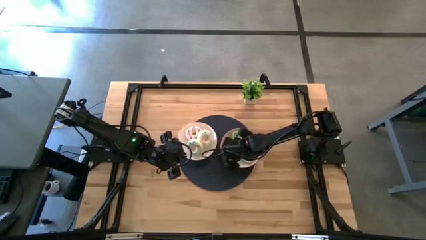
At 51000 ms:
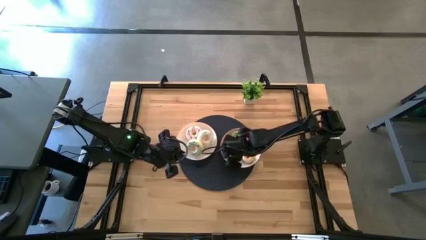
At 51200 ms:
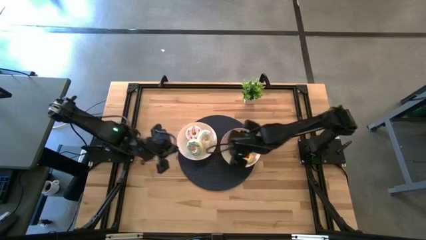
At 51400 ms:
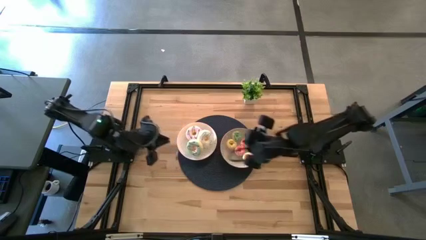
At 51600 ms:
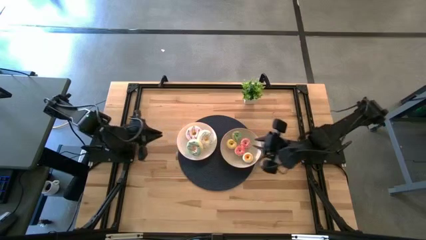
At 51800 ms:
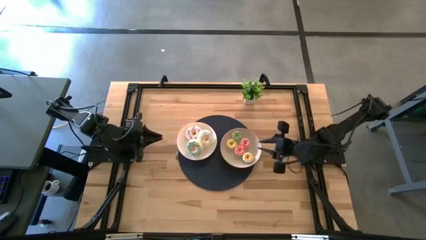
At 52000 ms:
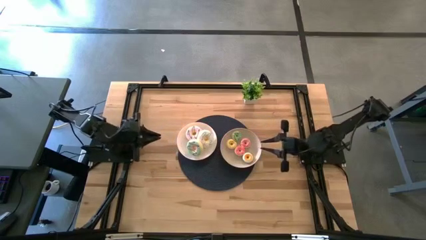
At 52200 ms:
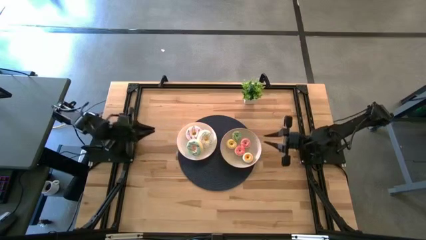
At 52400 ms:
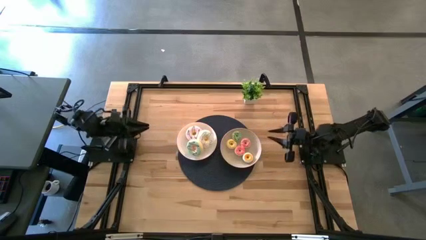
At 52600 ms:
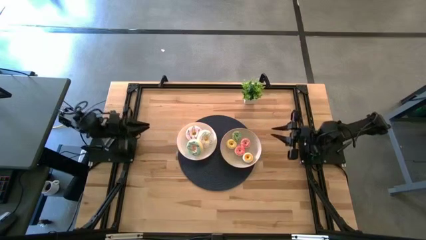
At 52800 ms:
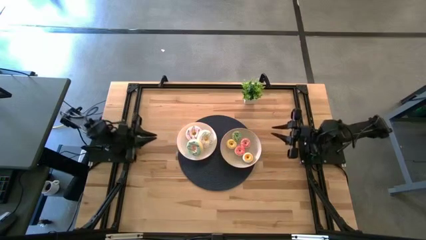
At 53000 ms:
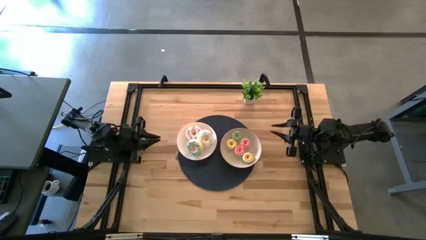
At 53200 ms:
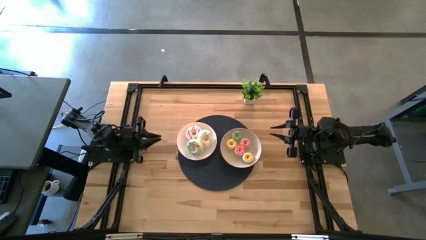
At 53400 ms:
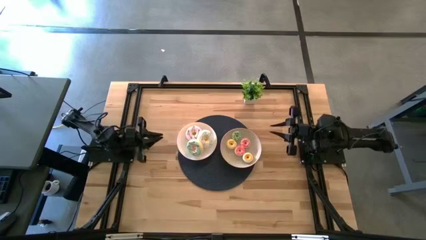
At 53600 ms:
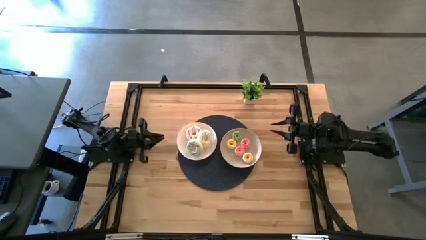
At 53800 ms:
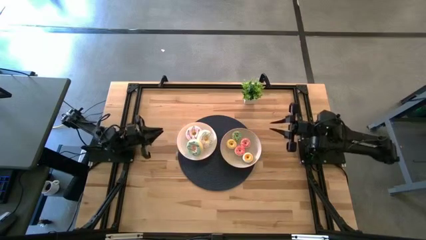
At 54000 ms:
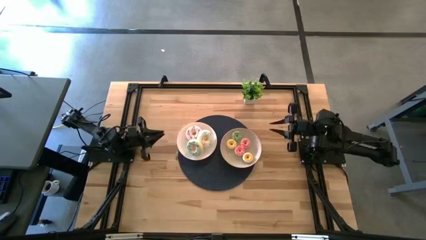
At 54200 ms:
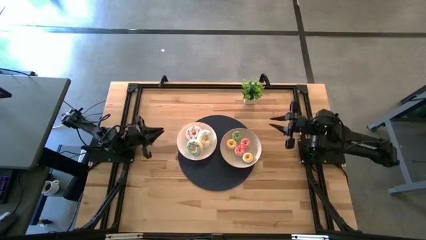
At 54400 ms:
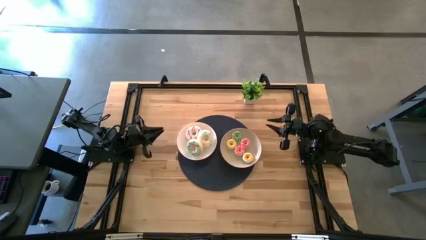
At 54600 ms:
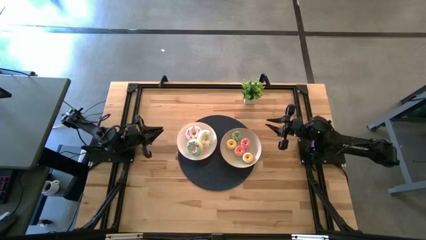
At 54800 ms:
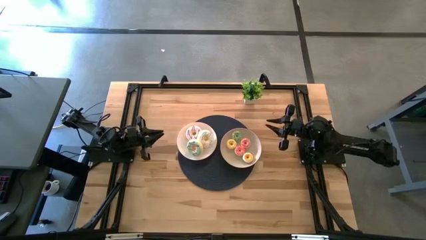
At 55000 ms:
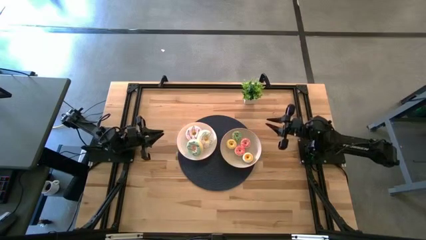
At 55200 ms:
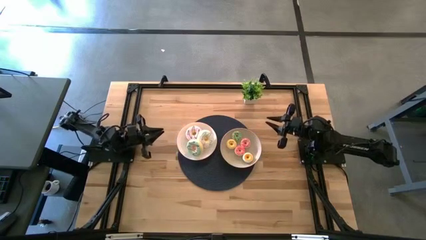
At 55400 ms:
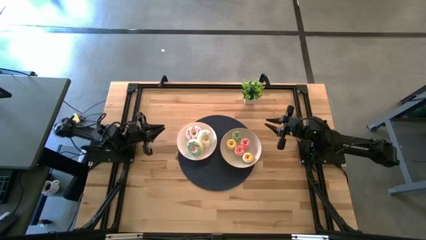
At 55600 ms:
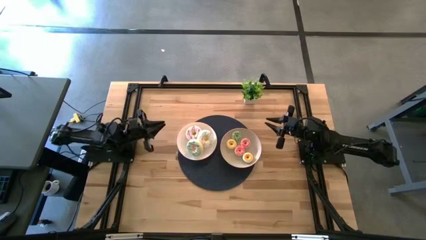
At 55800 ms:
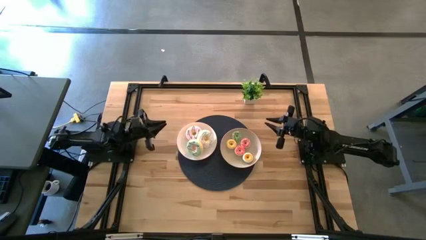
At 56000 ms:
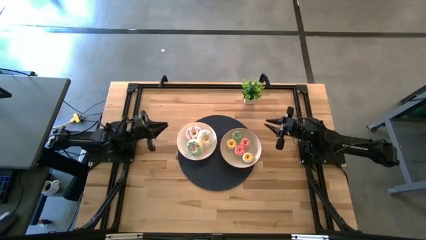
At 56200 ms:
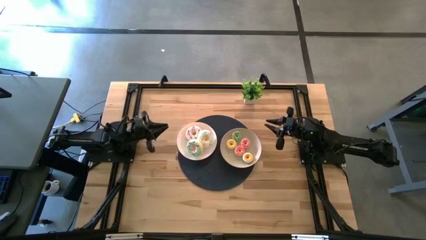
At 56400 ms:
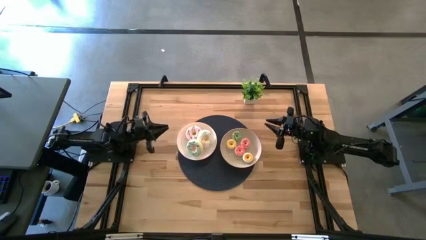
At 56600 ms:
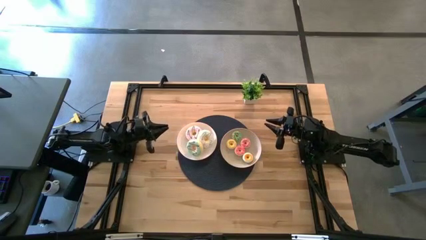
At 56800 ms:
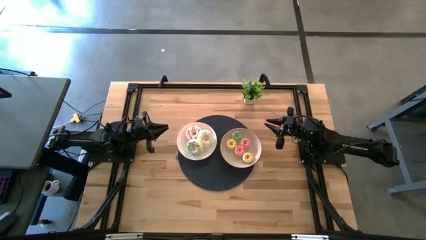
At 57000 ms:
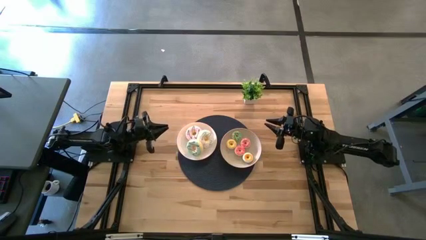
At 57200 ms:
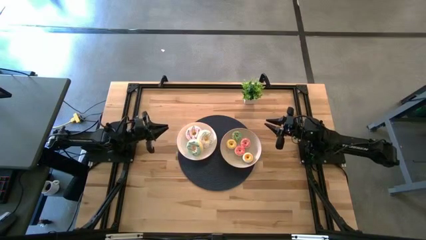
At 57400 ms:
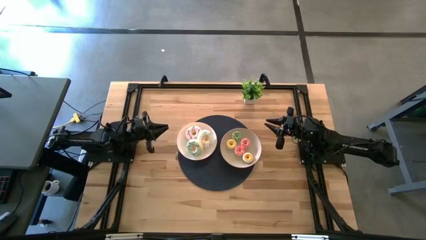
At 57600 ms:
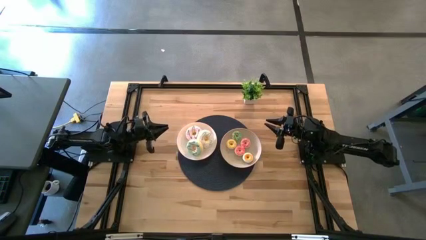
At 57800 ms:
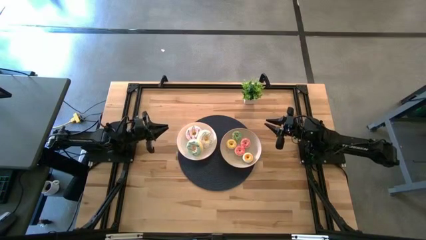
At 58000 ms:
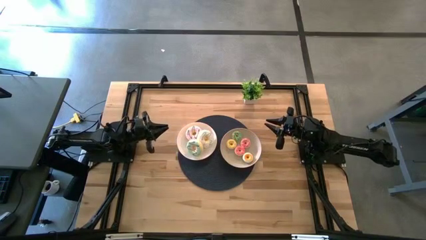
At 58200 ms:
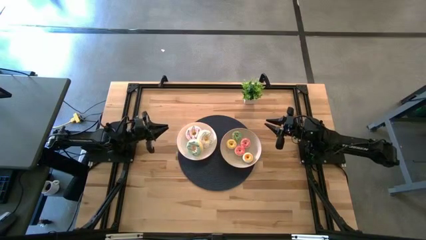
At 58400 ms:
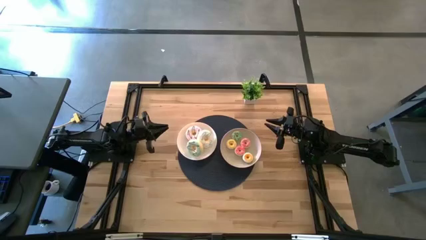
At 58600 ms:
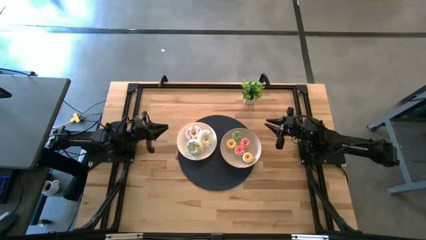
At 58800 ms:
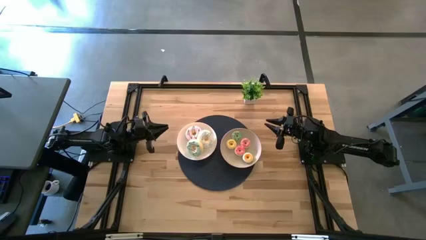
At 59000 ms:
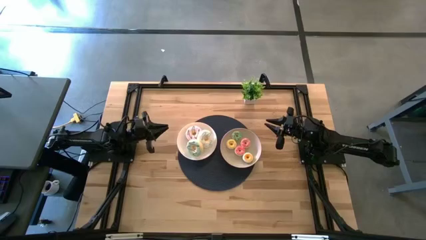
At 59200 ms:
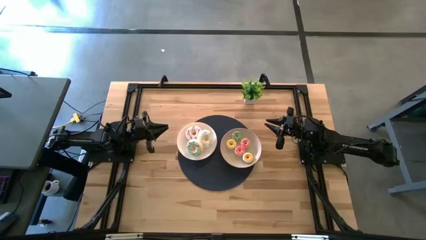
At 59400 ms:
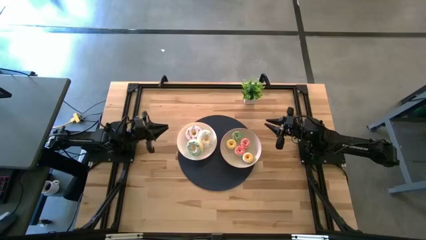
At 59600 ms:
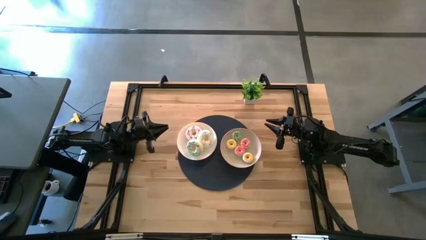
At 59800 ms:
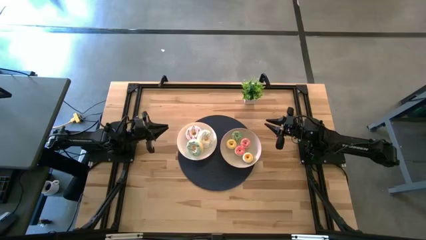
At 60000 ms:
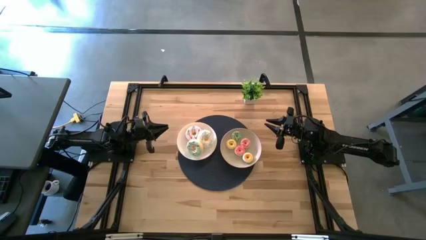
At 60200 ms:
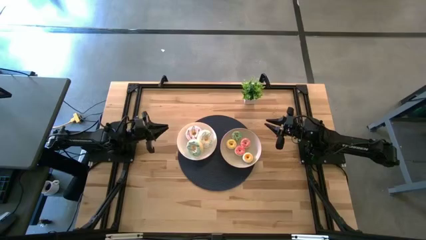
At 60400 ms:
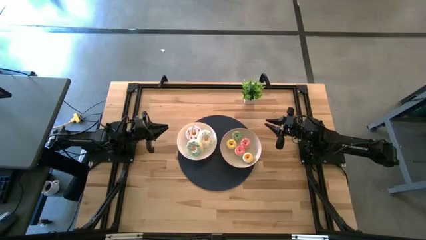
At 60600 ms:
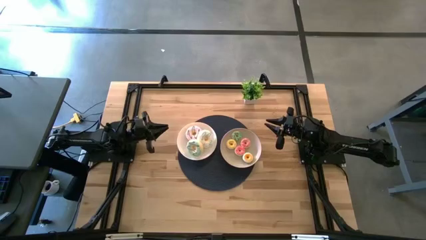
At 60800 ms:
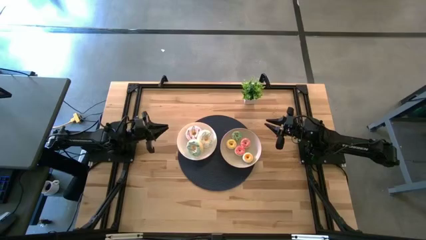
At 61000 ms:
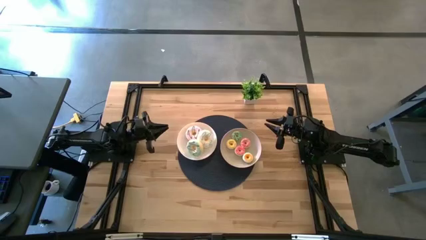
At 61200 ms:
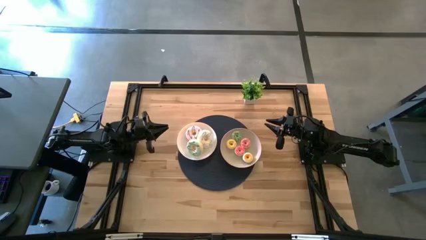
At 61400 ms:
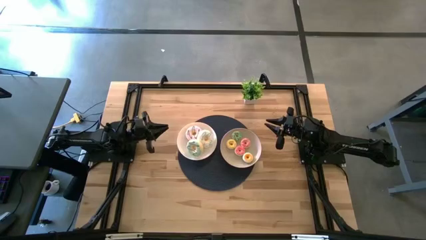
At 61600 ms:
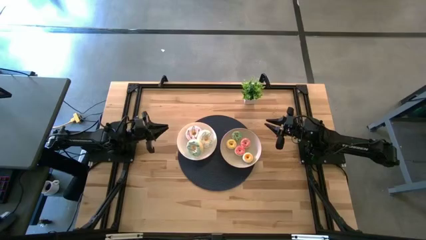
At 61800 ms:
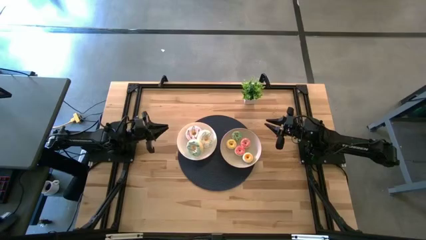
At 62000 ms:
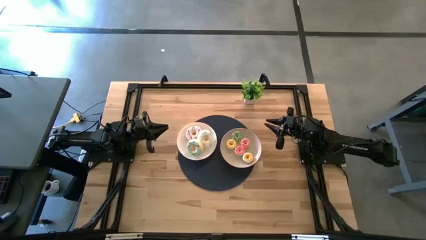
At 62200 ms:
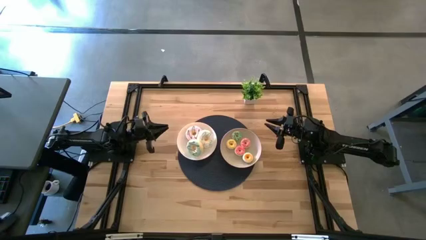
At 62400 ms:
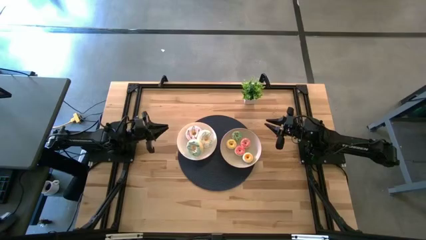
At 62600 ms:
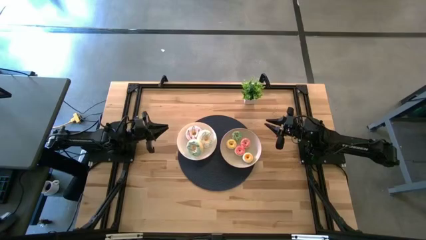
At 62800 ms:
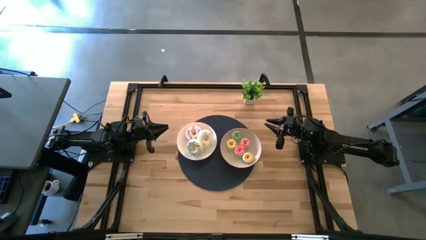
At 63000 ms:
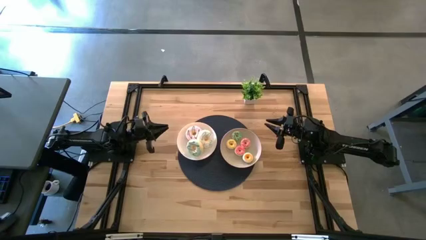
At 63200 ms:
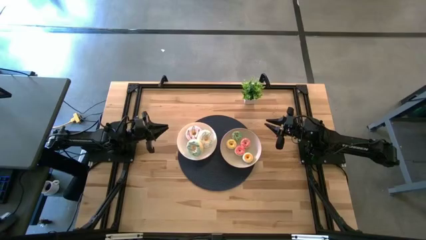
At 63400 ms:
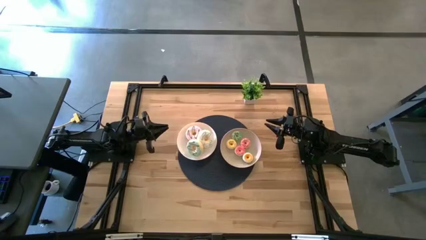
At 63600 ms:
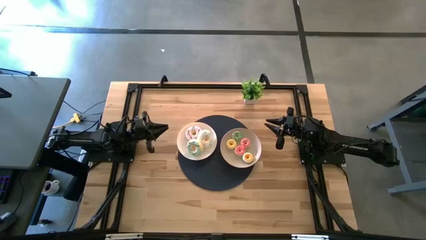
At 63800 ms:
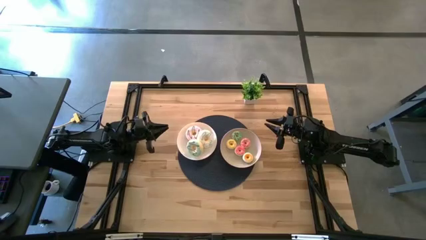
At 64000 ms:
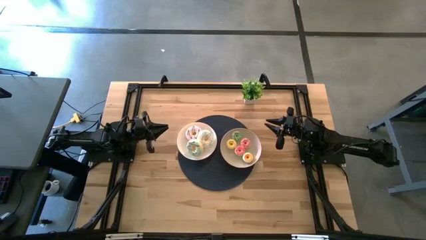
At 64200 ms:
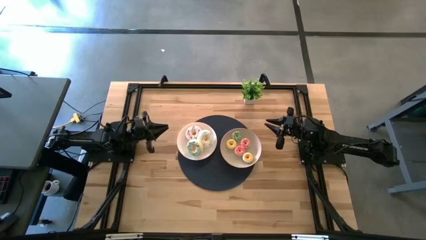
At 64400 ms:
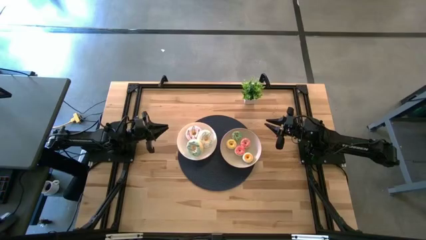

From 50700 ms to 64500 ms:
Task: Pick & Place donuts
Return to Home Position
